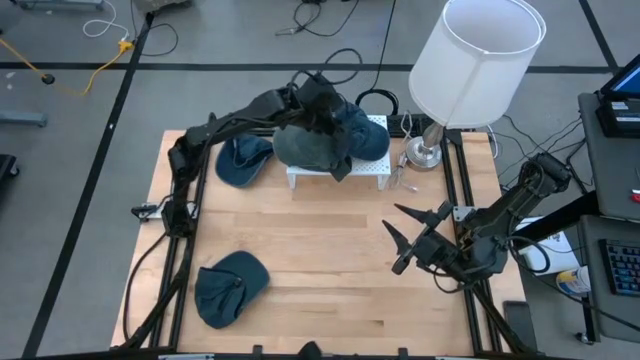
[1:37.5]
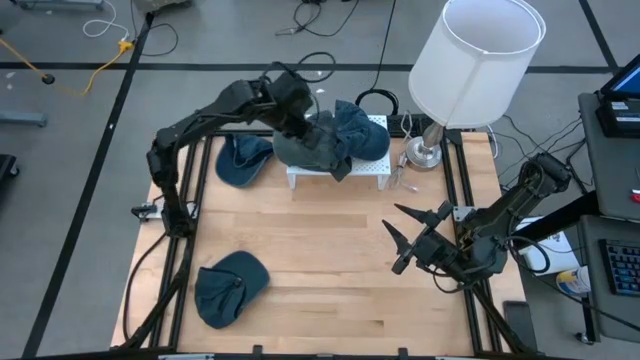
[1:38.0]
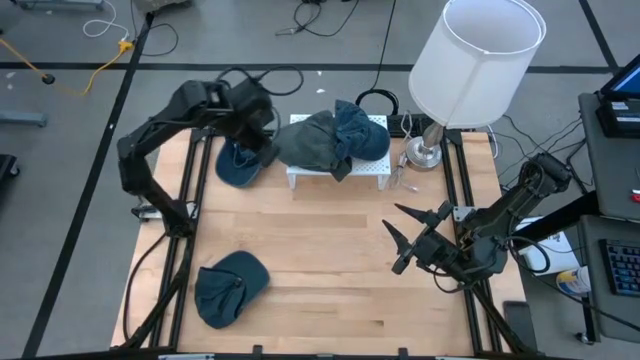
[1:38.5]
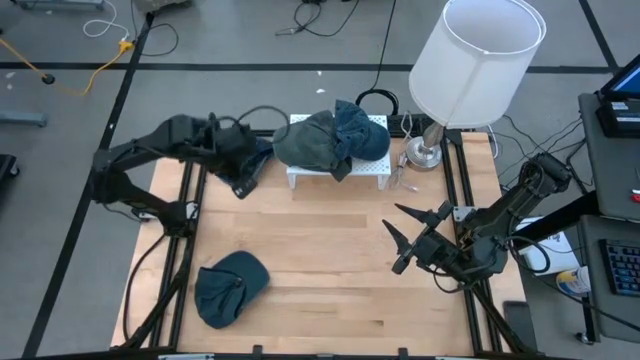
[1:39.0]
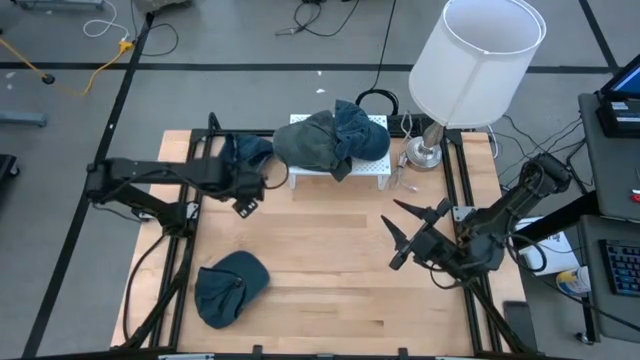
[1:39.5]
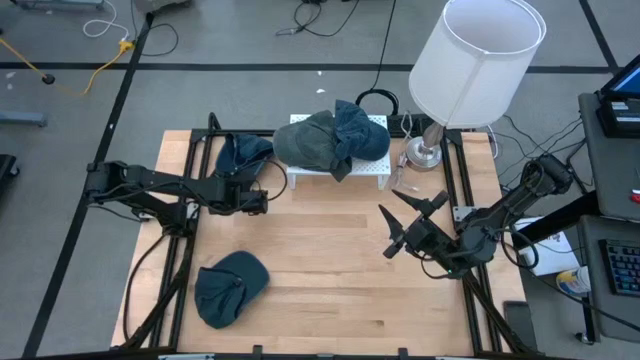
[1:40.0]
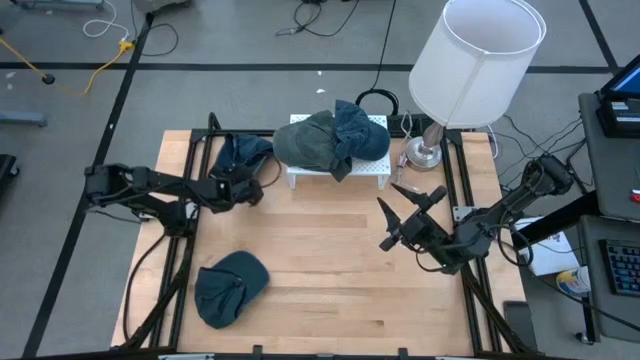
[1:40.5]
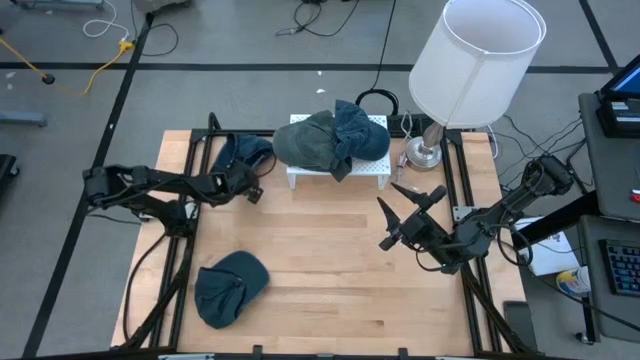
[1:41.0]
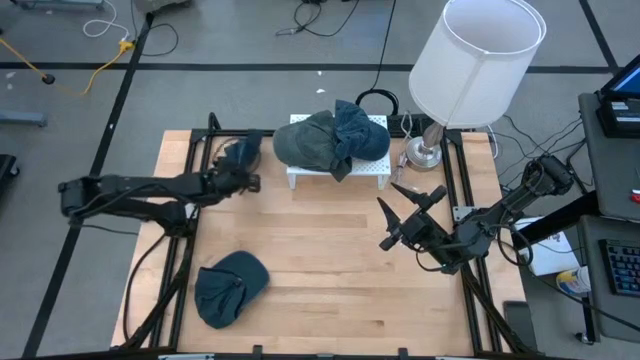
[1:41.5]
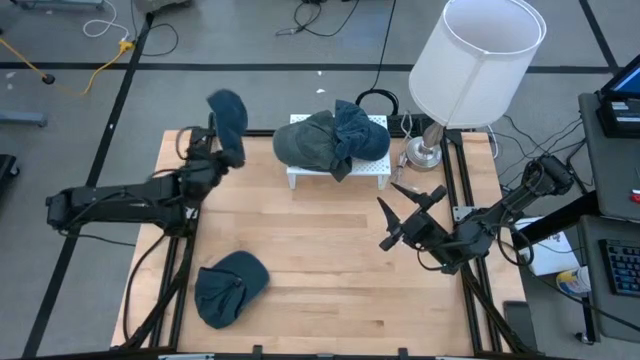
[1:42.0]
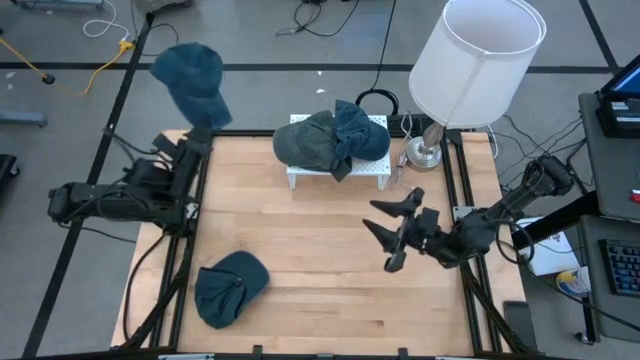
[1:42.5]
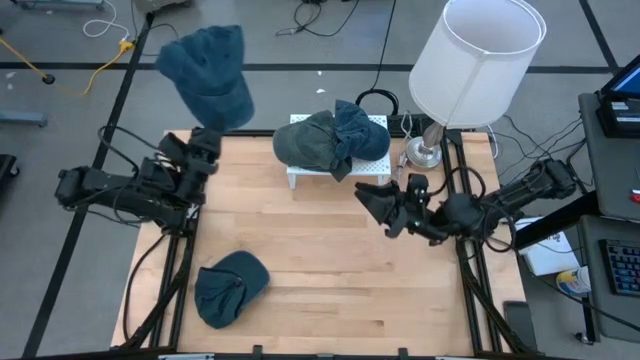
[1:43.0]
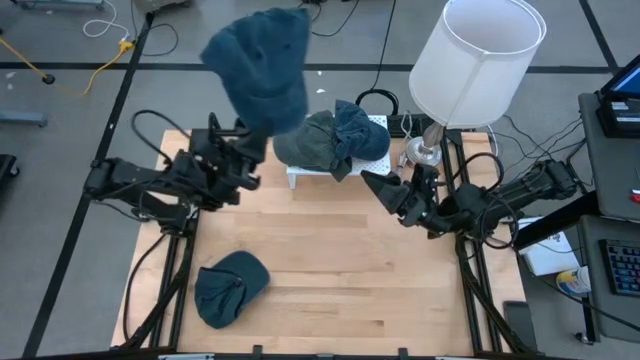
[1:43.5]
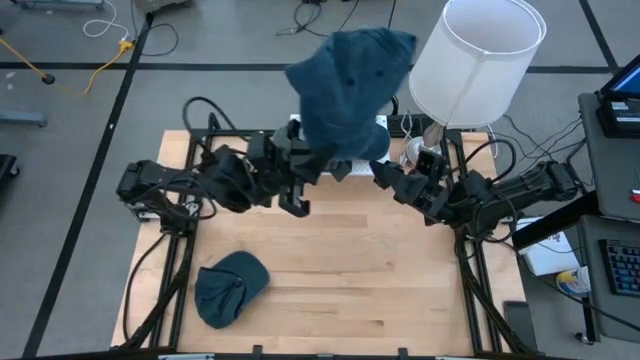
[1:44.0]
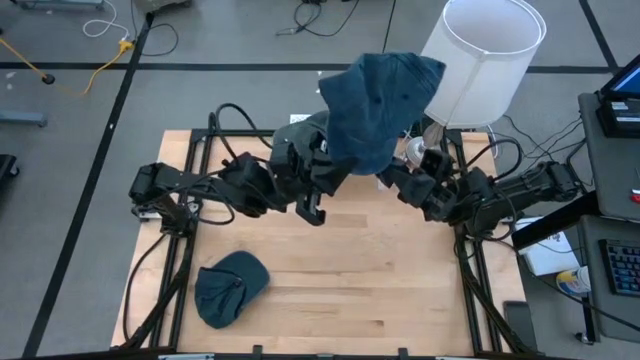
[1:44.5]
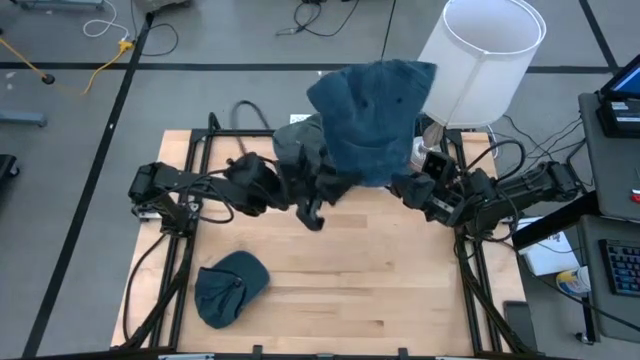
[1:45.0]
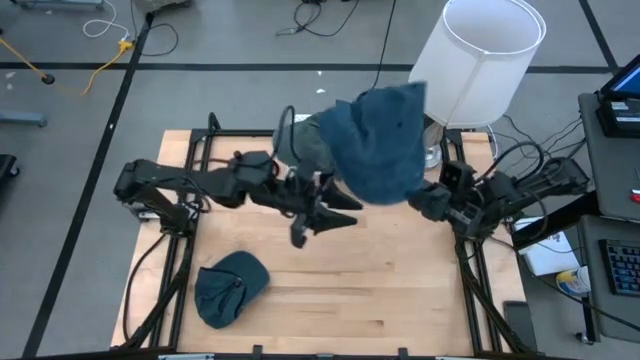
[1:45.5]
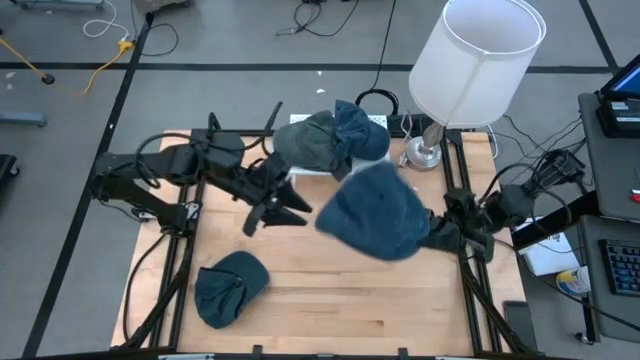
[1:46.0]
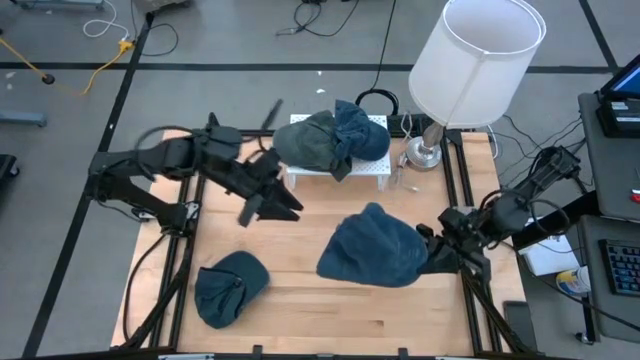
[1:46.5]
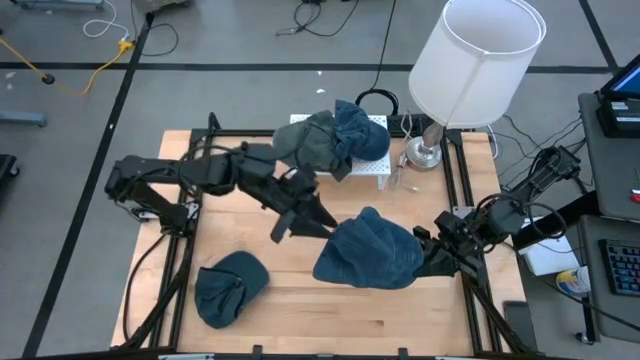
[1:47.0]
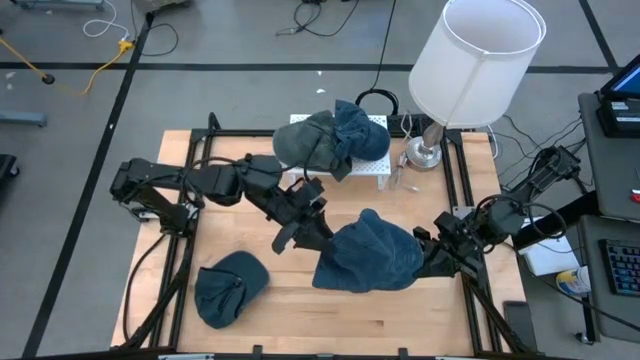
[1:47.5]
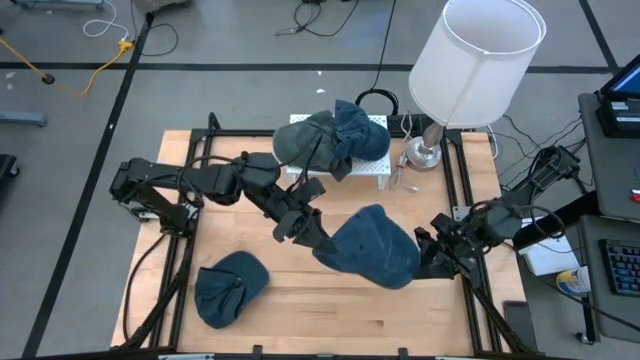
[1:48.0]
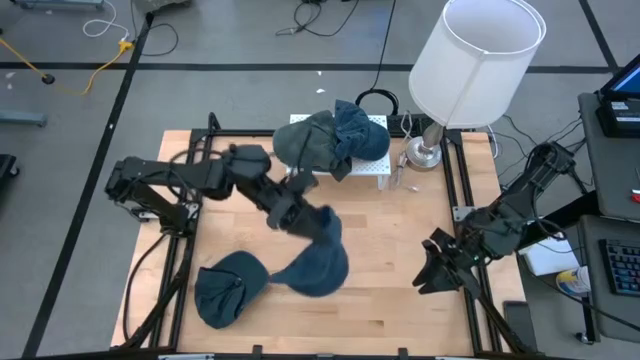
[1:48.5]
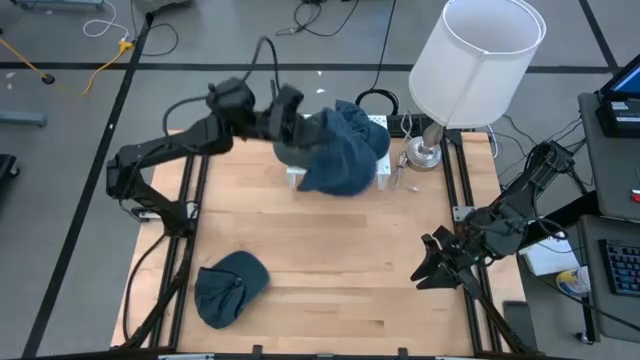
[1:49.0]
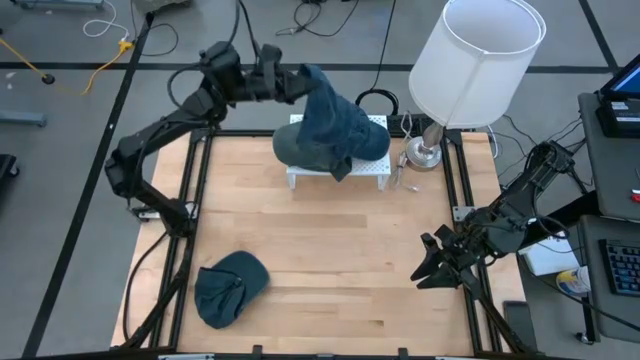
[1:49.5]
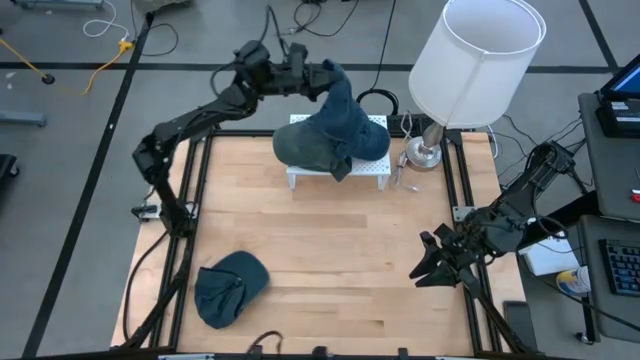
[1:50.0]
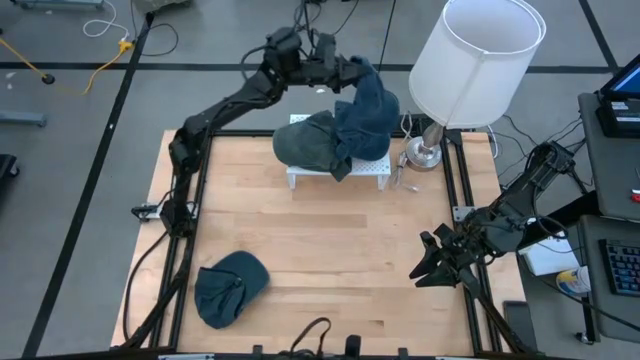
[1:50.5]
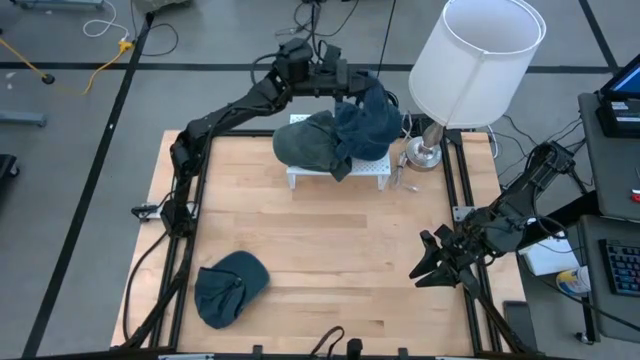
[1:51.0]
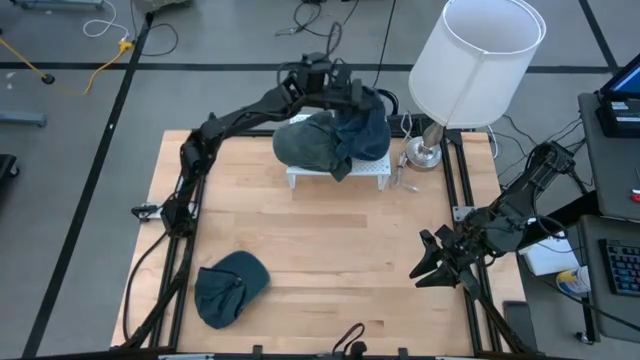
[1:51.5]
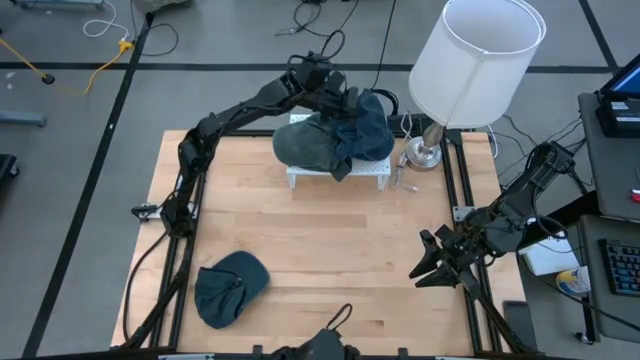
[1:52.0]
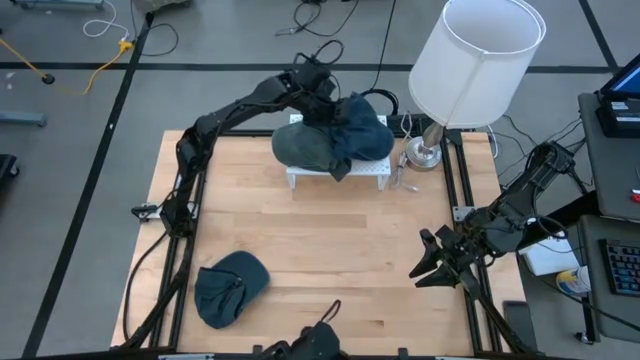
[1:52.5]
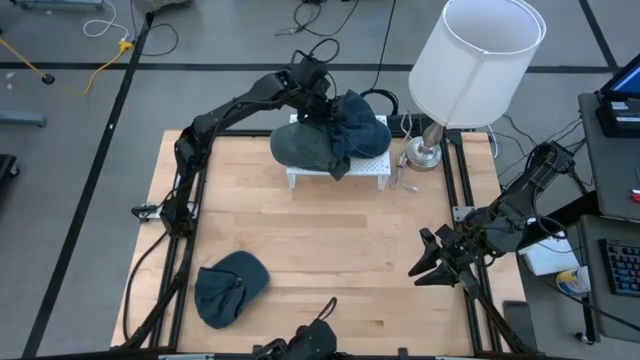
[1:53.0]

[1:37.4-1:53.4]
Task: Pick & Place hat
Stack the top blue cap on top of the blue cap on the shelf

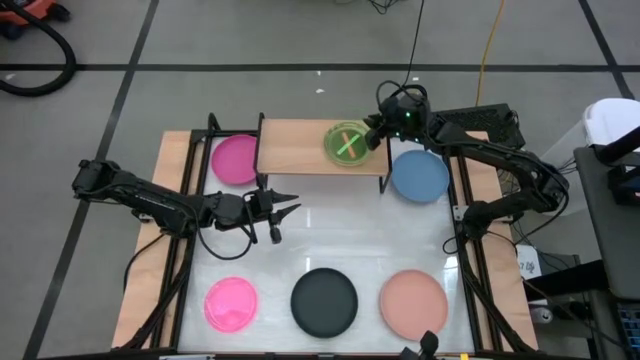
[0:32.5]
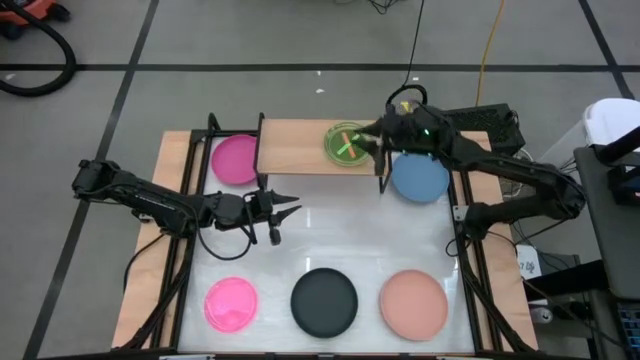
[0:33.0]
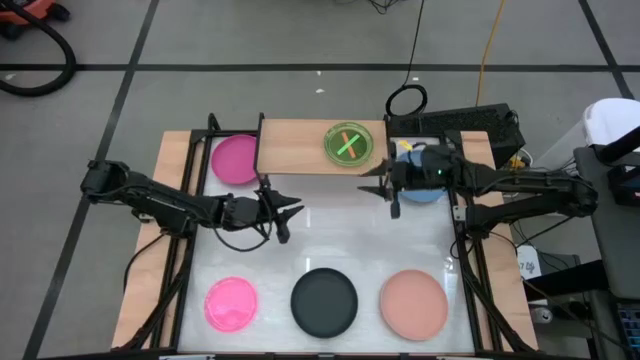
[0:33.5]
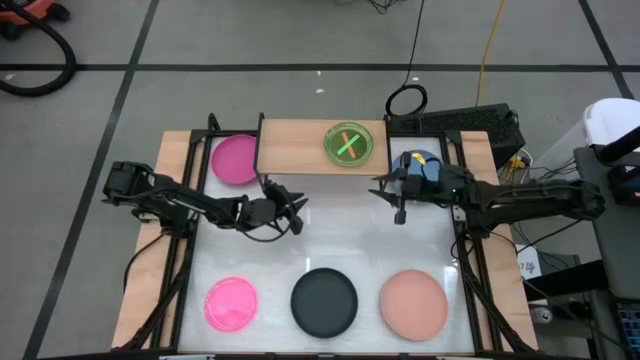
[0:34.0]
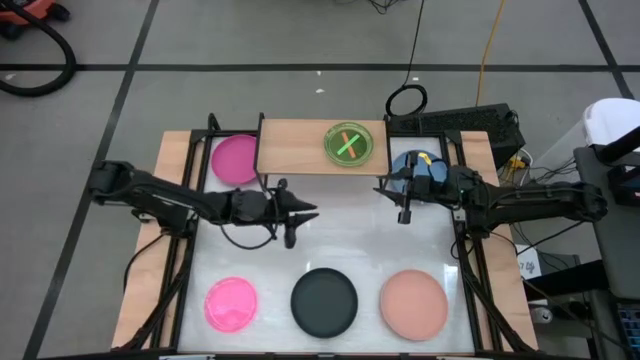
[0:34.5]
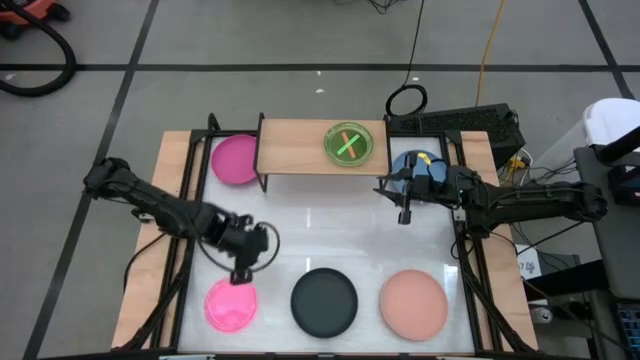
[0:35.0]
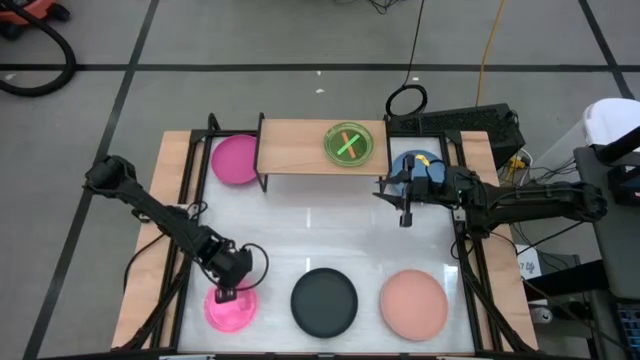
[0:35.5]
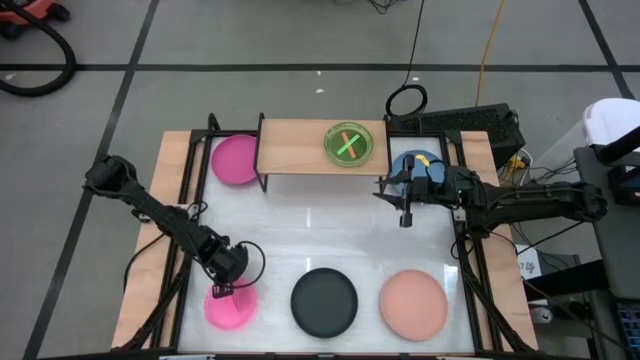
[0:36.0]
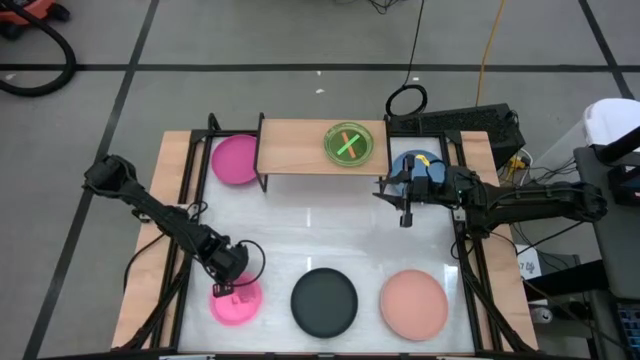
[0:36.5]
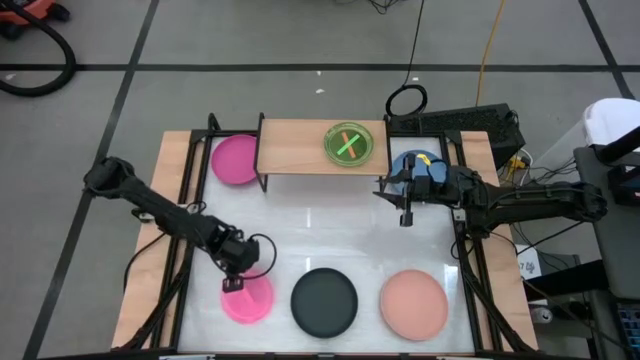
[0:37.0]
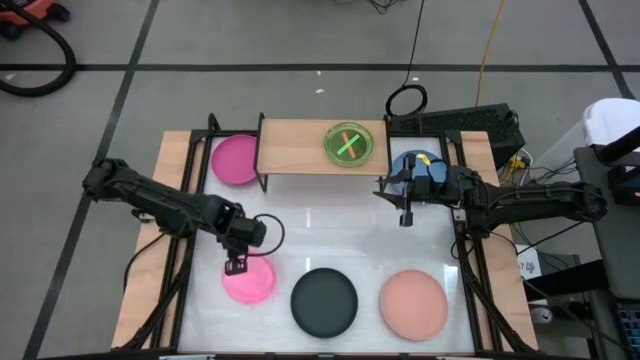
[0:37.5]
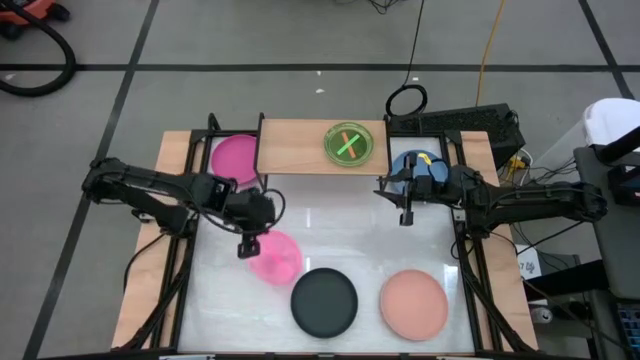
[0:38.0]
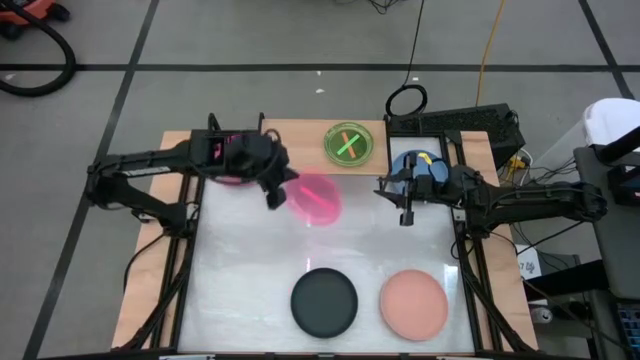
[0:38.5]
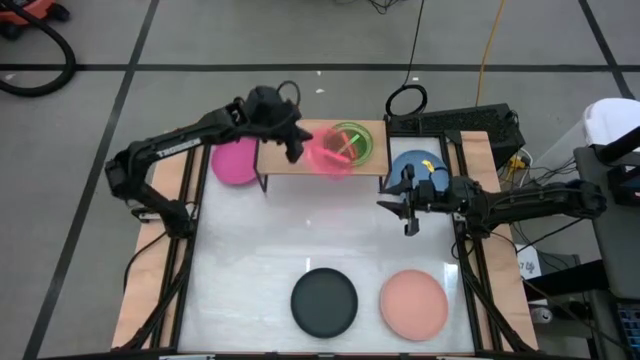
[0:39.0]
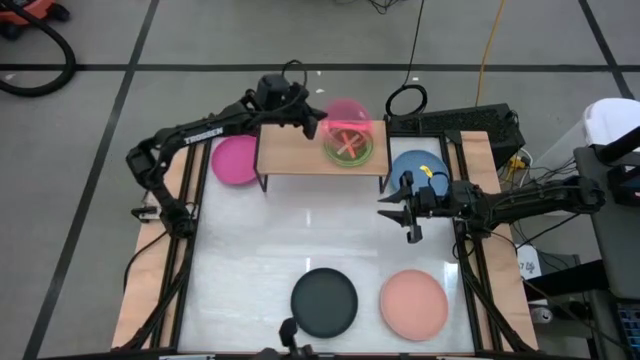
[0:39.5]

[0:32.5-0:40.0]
Task: Place and stack plates onto a shelf
Stack the light pink plate on top of the green plate on the shelf
